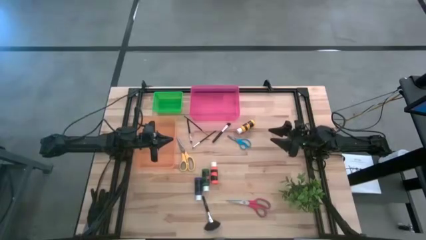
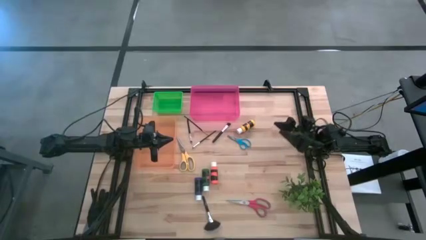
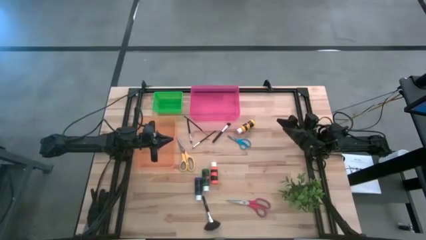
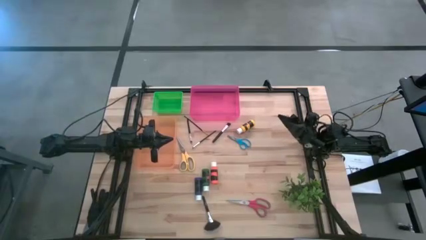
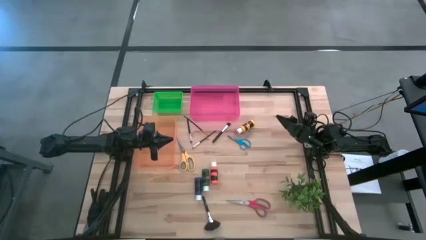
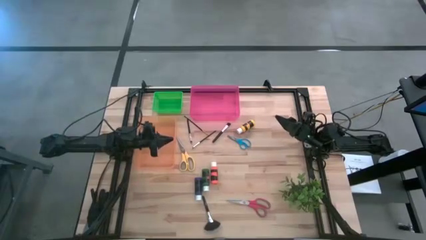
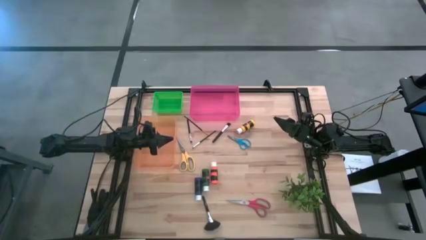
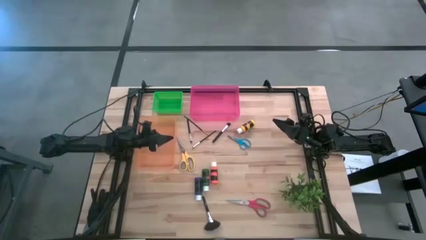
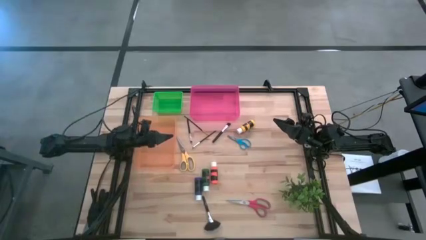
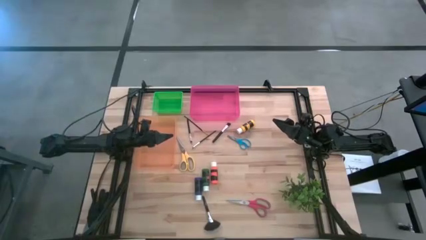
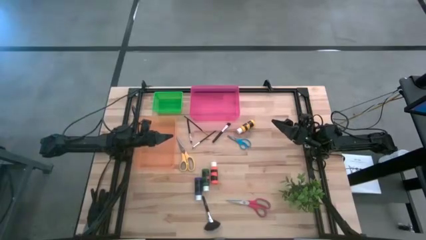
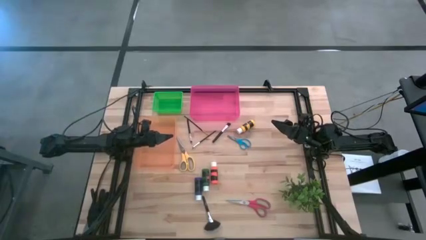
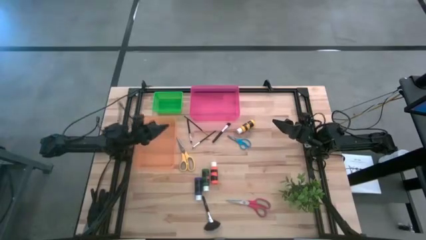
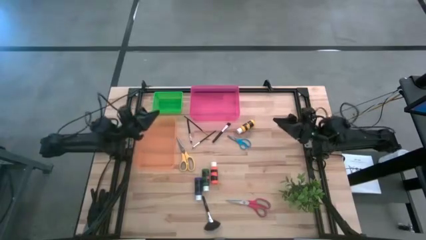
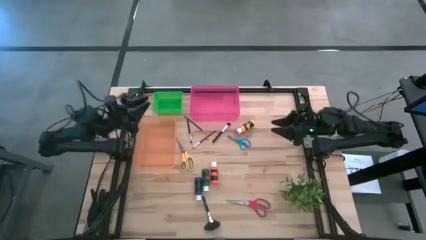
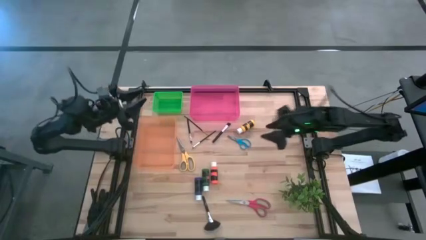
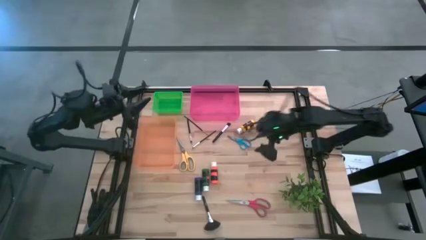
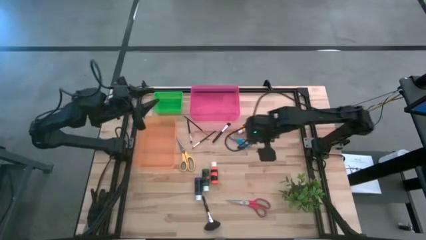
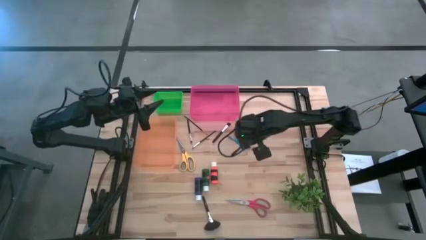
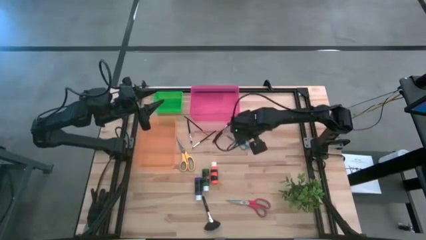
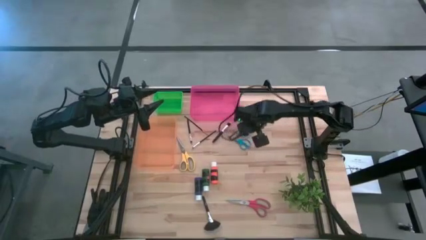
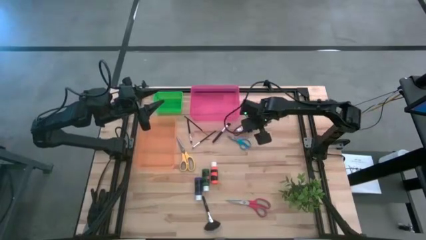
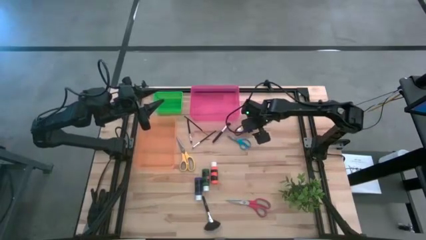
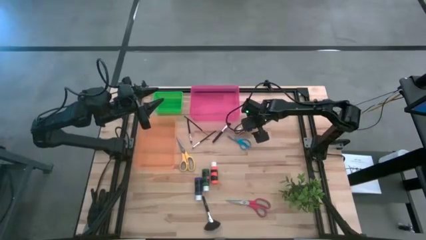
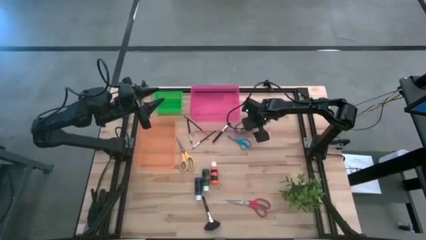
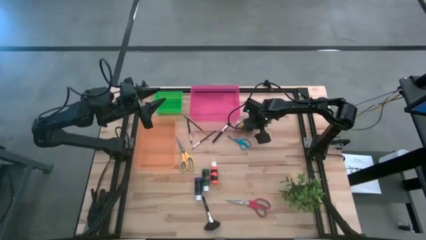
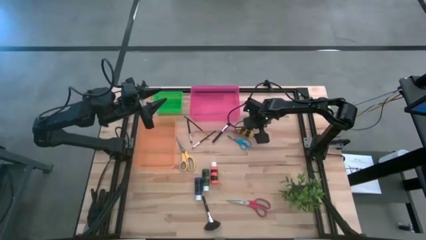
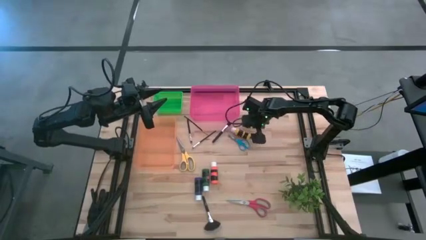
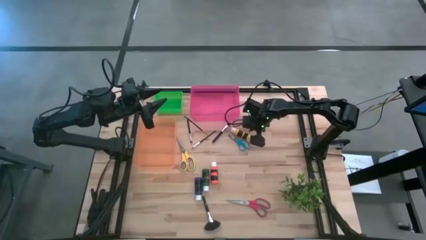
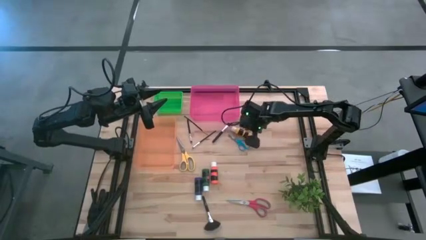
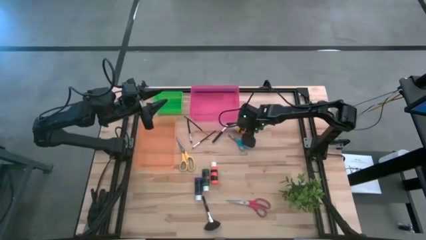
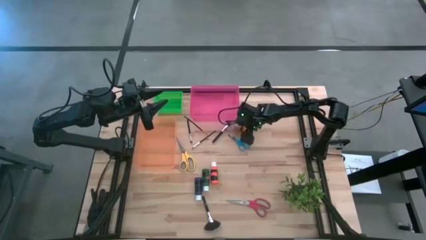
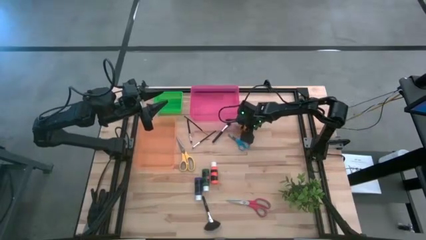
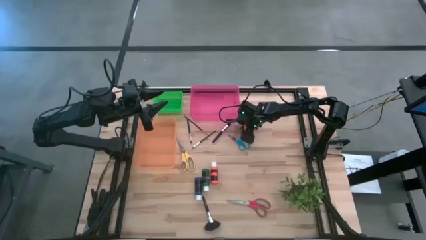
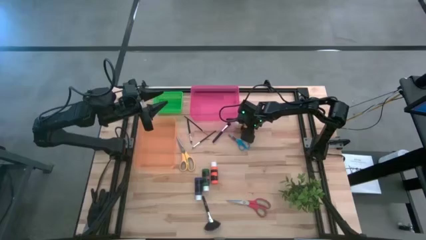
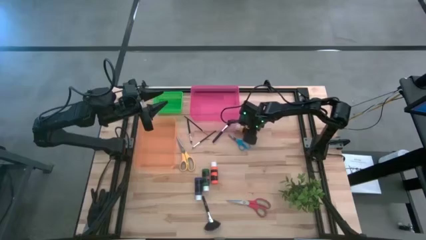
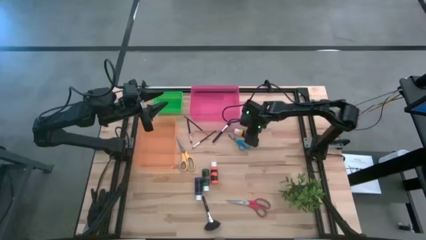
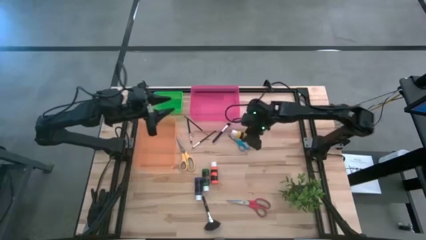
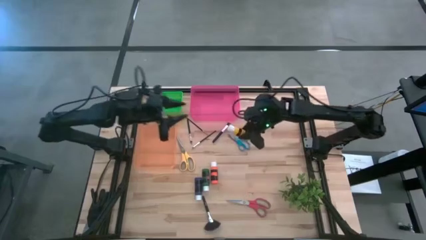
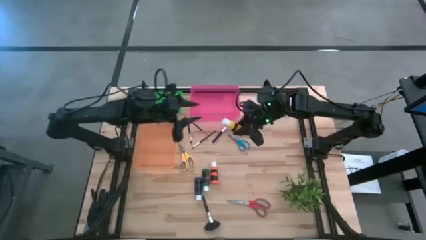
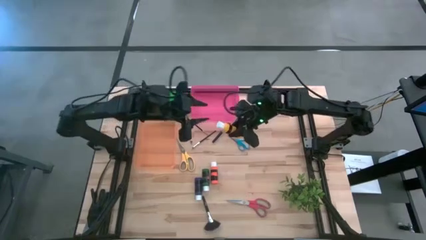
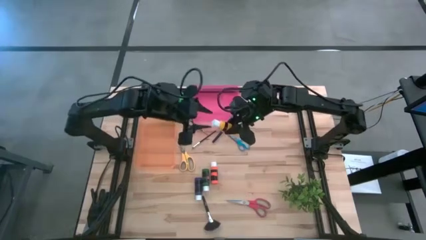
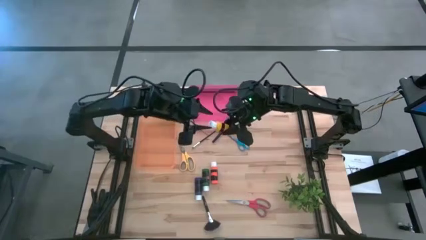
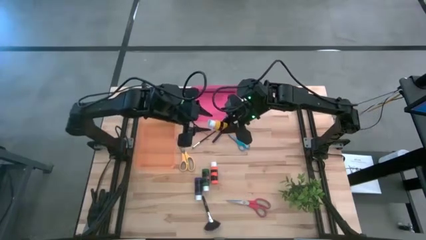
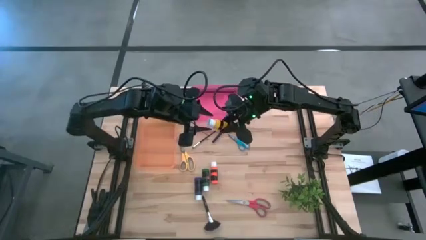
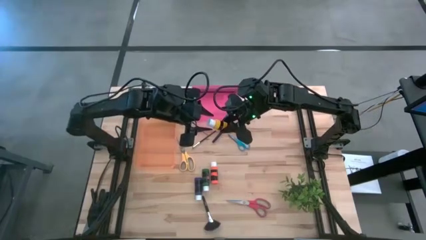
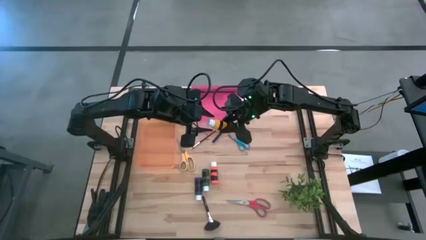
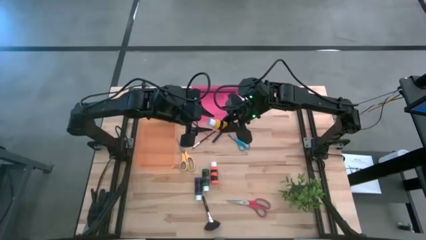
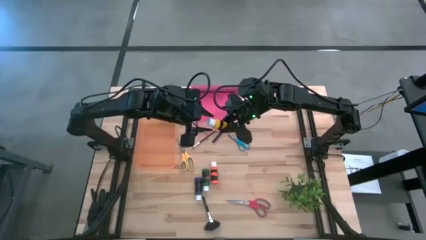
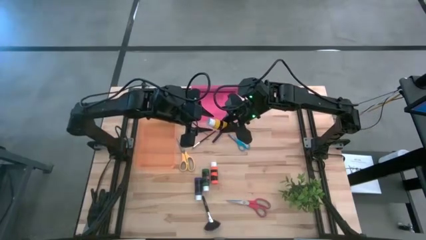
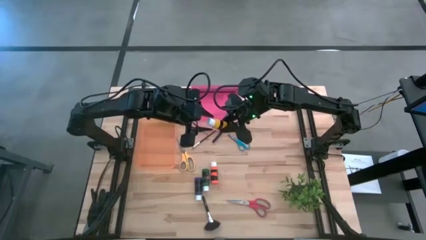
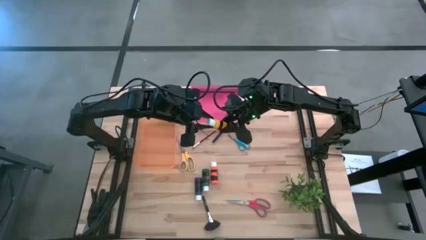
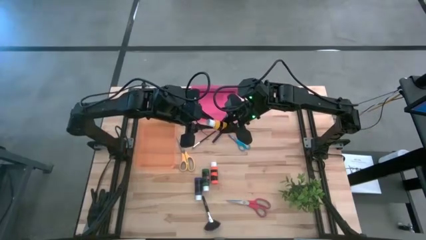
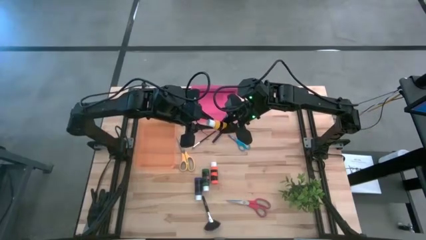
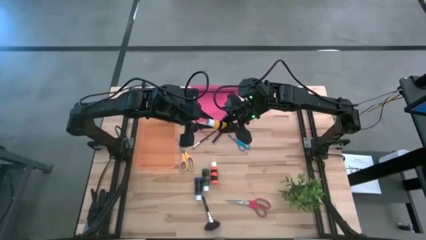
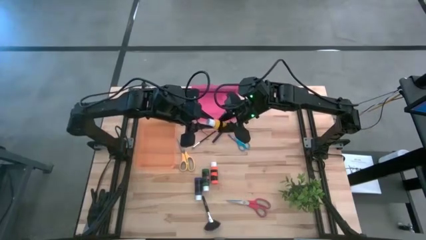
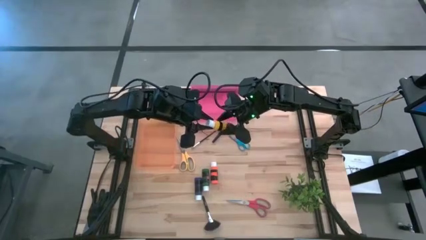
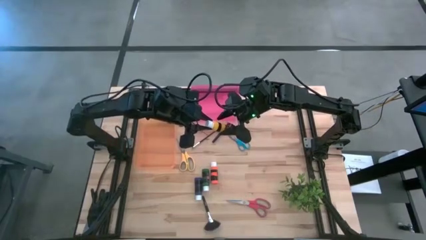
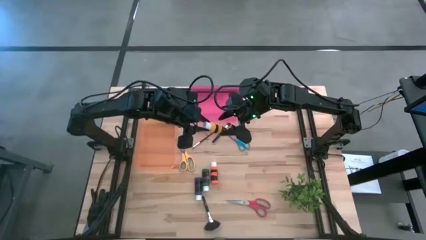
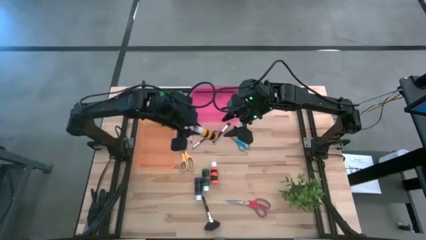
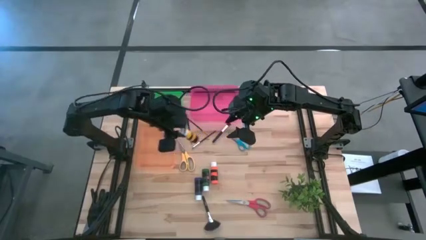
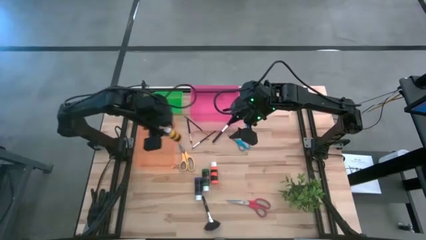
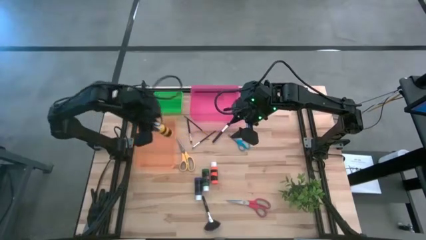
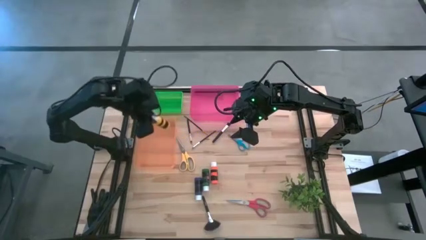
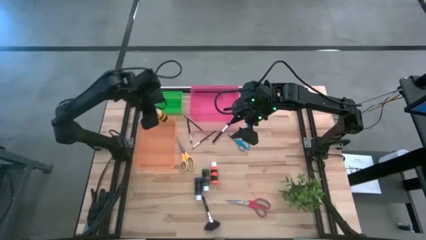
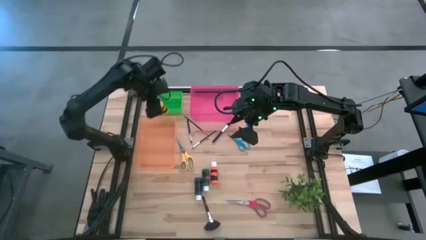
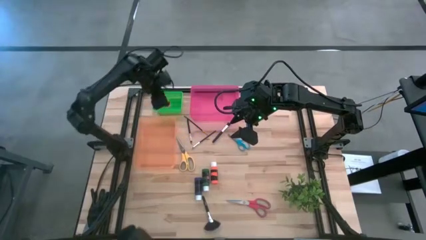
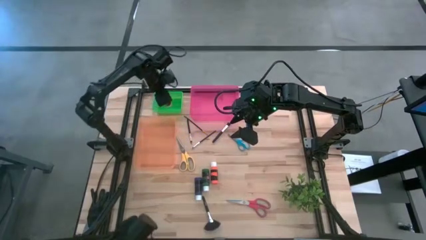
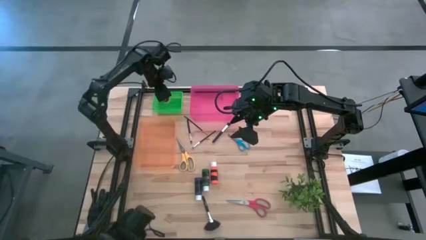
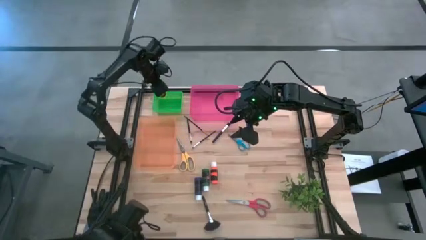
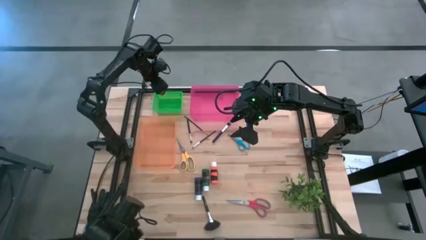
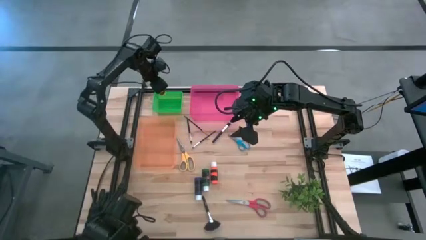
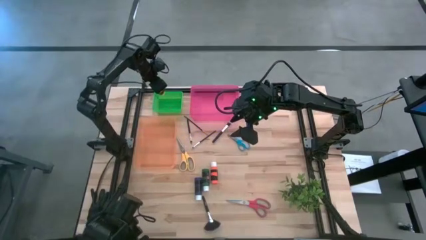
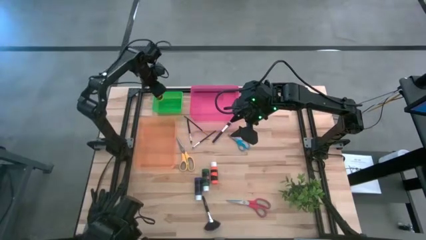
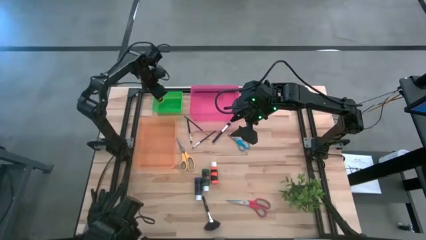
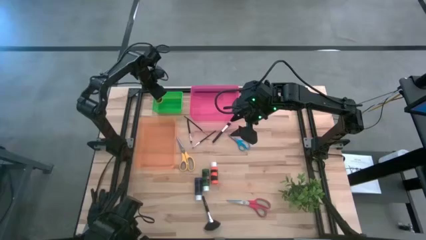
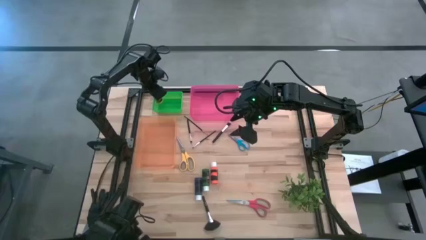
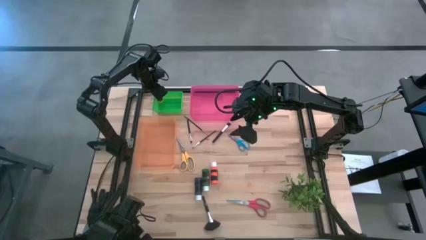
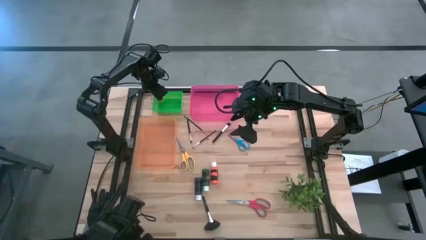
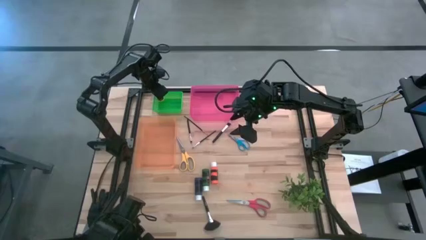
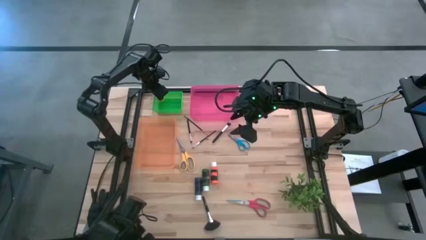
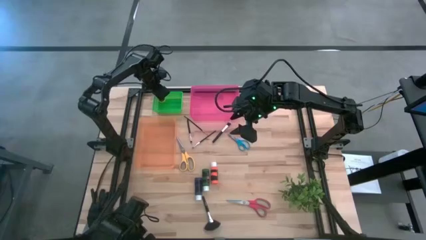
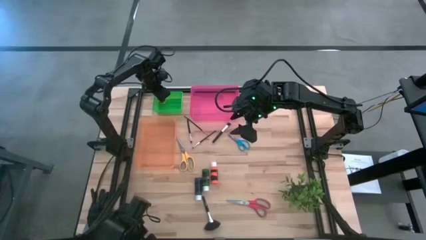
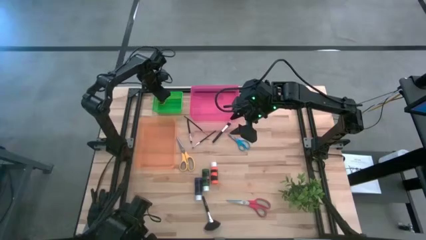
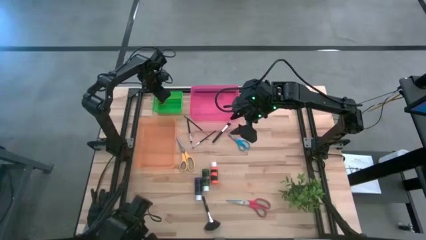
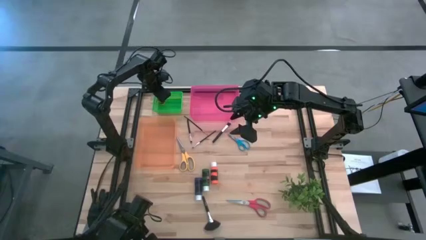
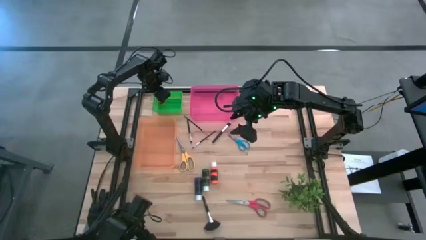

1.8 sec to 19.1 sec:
Task: Pick & Place Paint Supplies
Put the yellow paint bottle into the green bin
